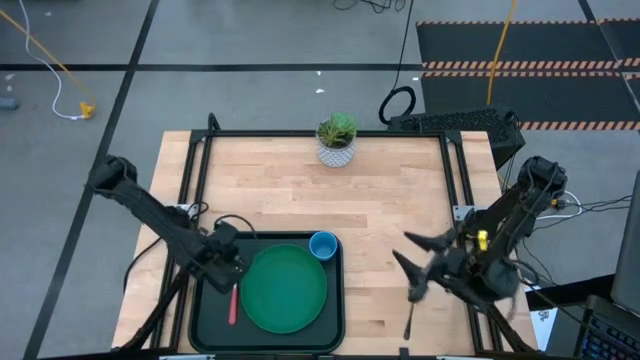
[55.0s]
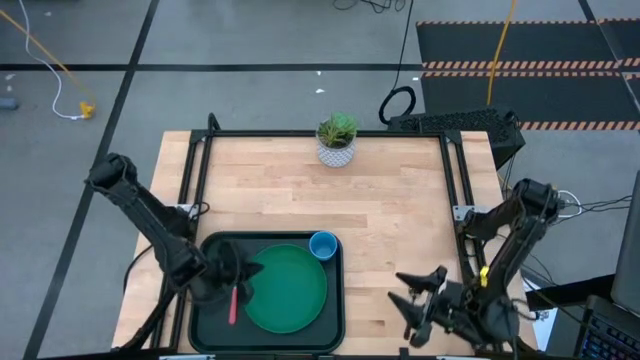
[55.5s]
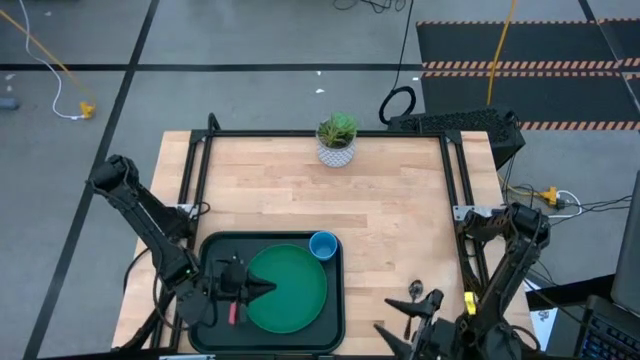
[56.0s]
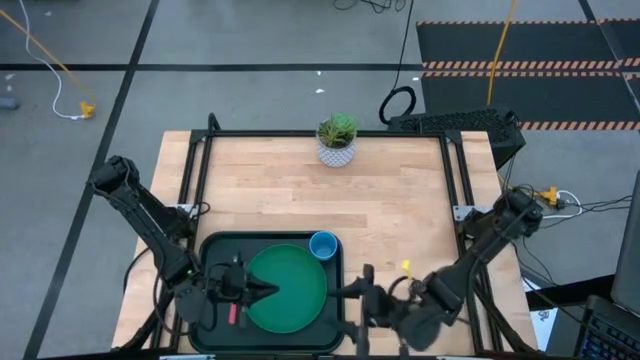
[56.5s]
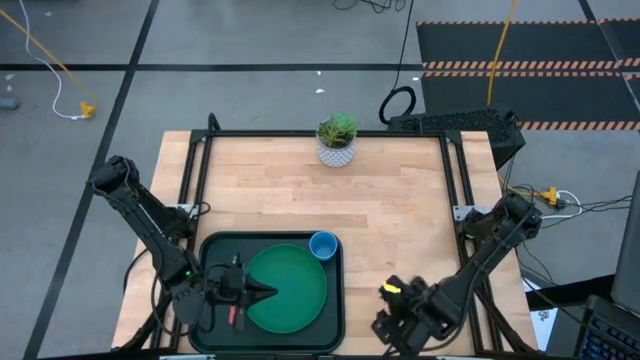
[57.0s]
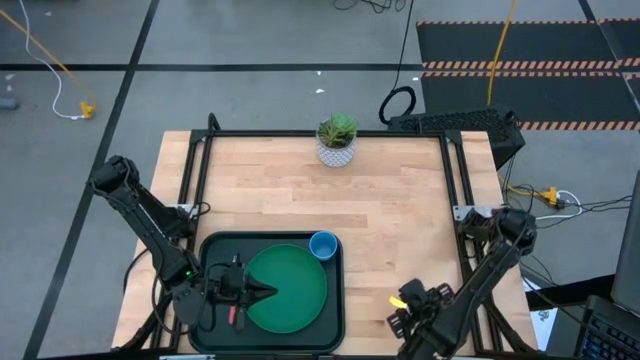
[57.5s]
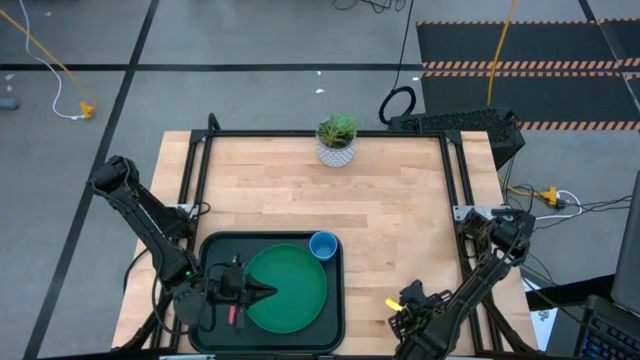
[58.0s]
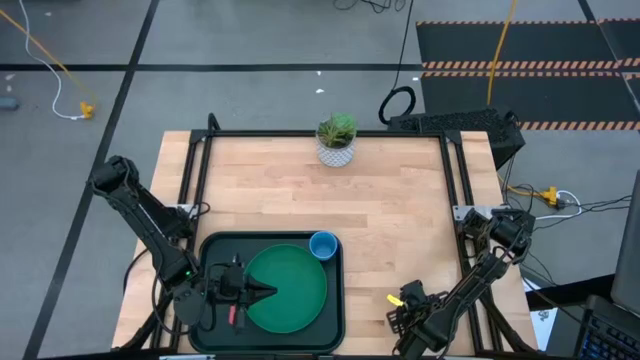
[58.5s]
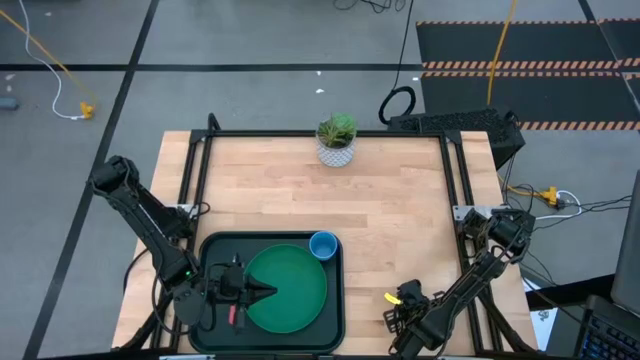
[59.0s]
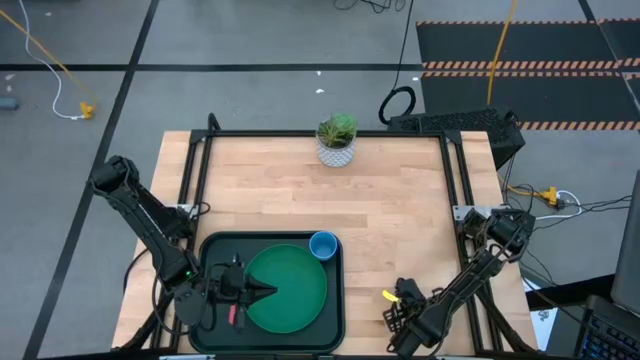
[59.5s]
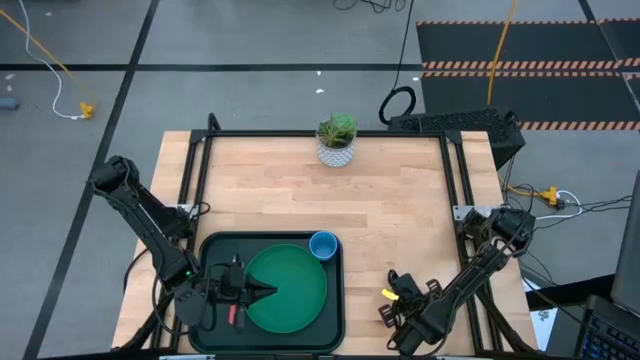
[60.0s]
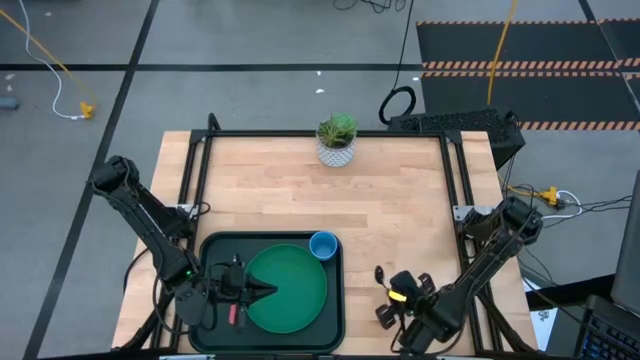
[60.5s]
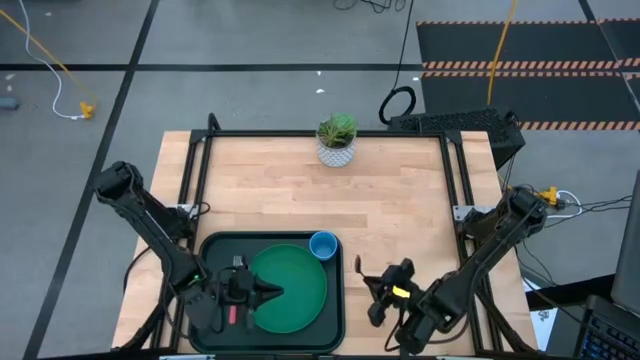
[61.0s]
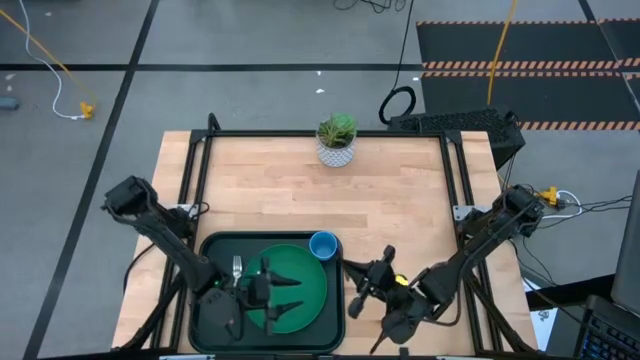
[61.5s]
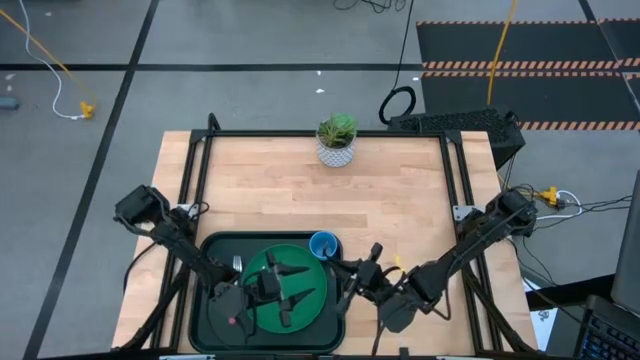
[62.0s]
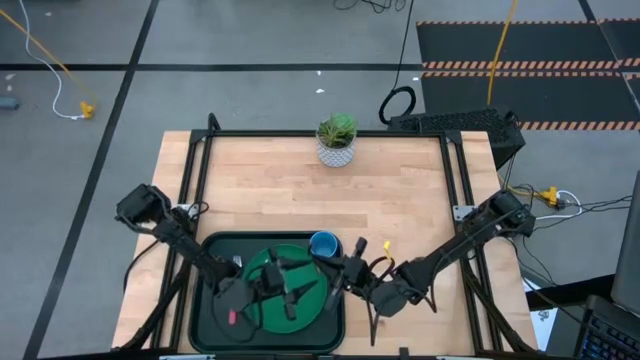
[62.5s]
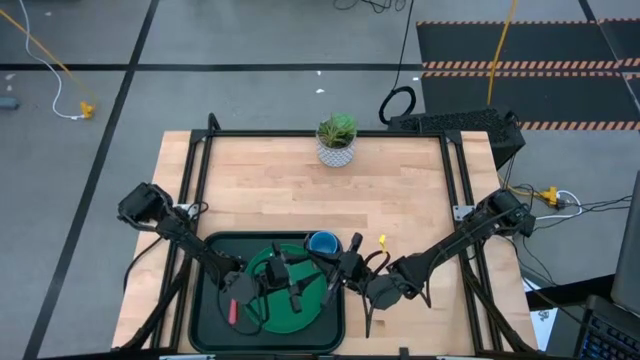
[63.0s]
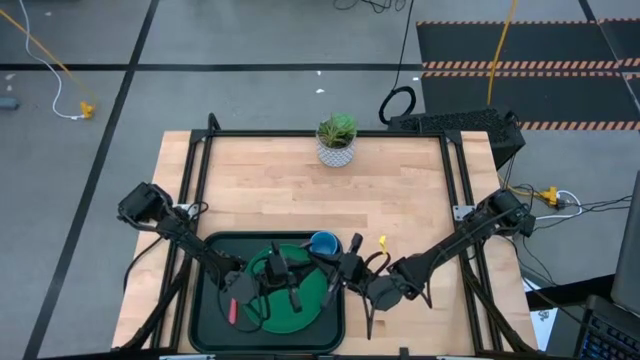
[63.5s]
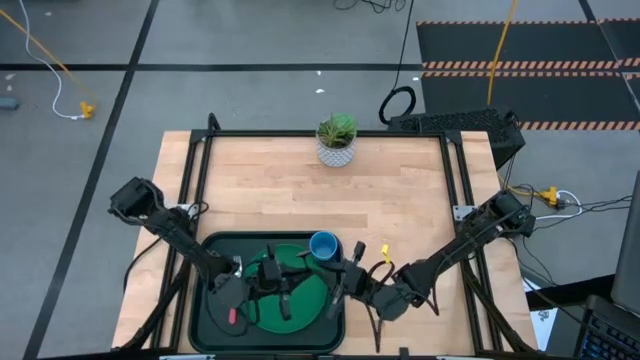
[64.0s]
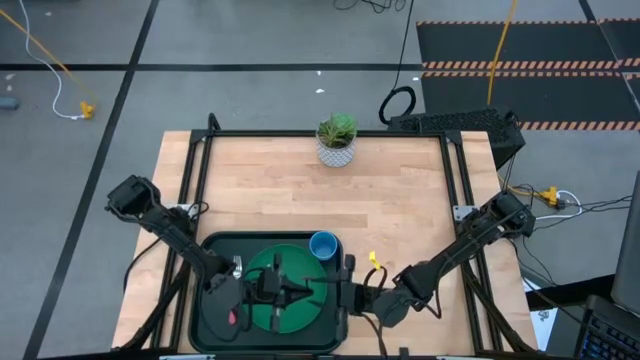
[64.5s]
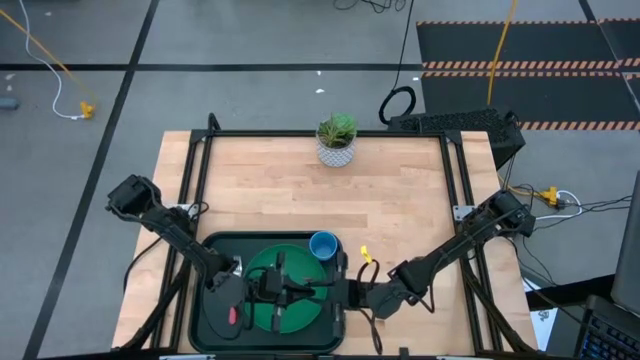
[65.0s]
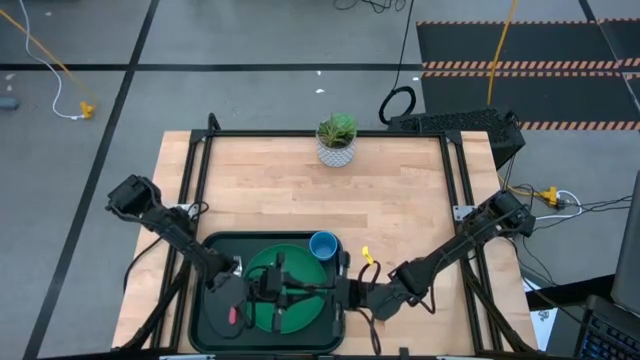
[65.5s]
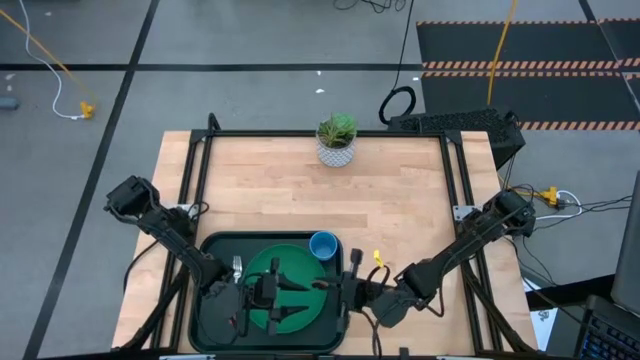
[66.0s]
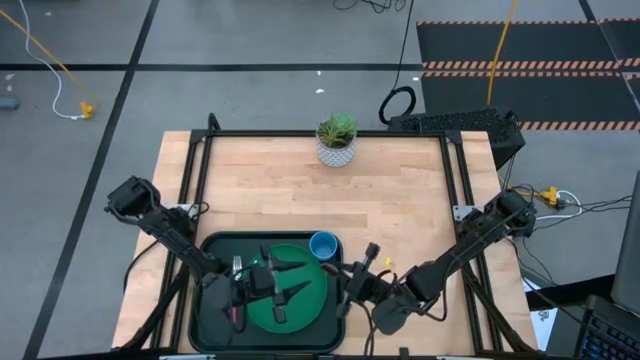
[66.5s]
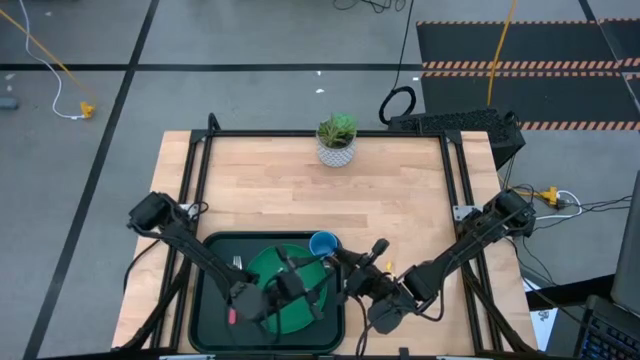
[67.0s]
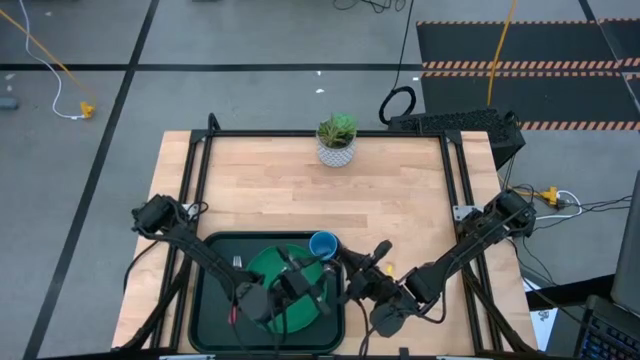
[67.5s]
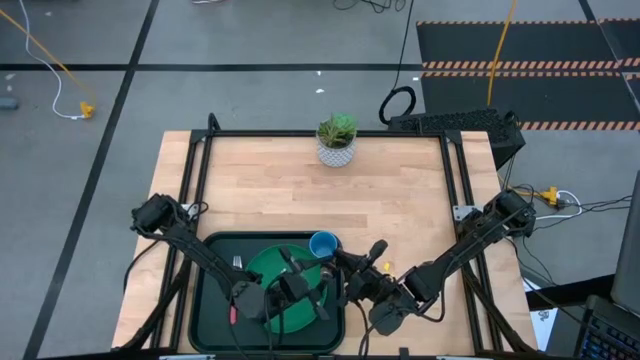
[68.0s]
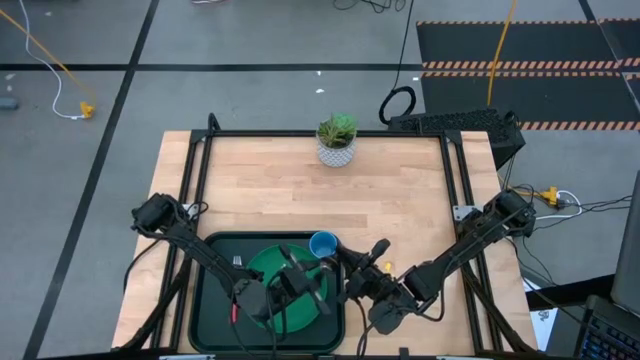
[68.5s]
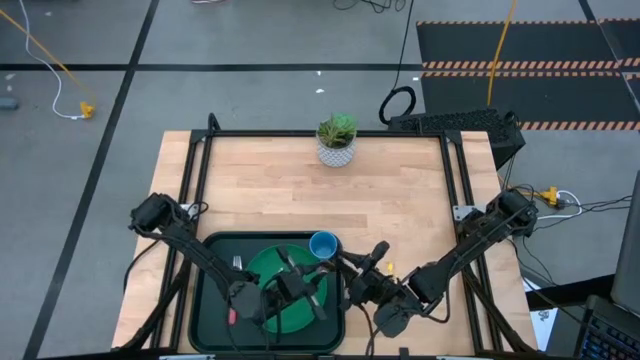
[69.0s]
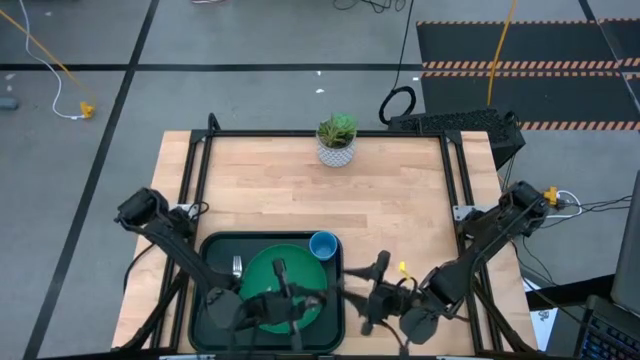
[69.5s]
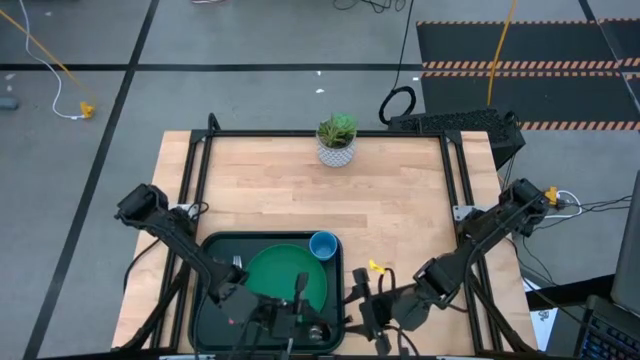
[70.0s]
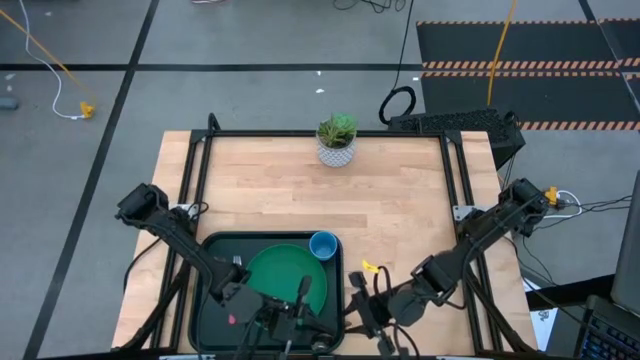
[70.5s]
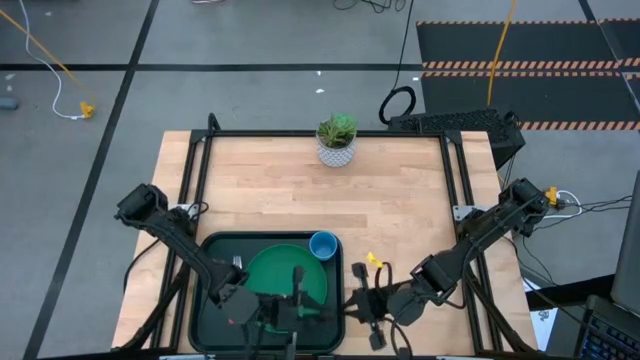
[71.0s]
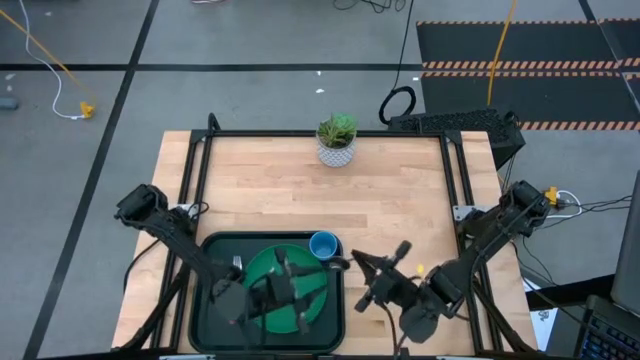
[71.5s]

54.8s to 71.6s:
Task: Pick and place plate/cup/fork/spoon on tray
Put the black spoon on the black tray to the left of the red fork

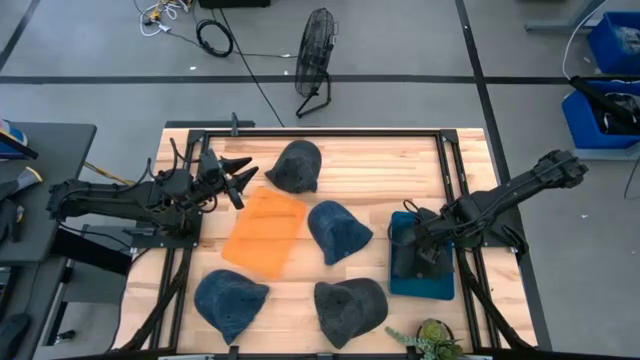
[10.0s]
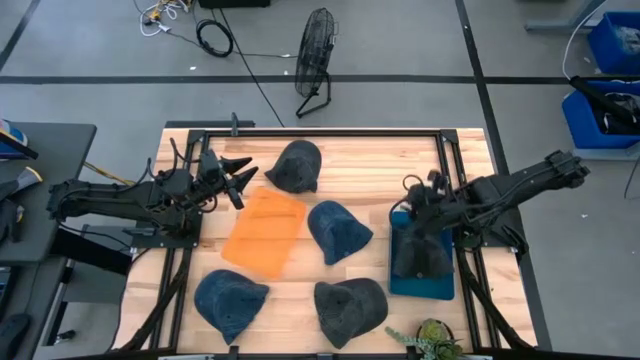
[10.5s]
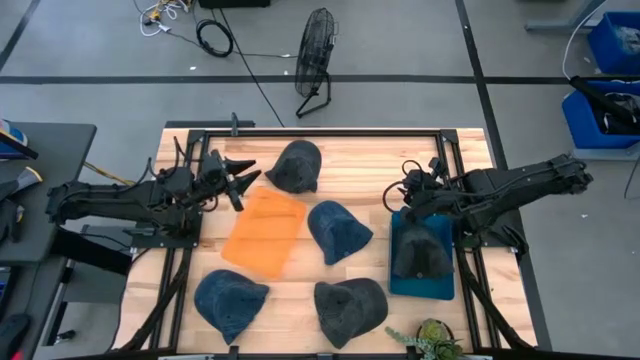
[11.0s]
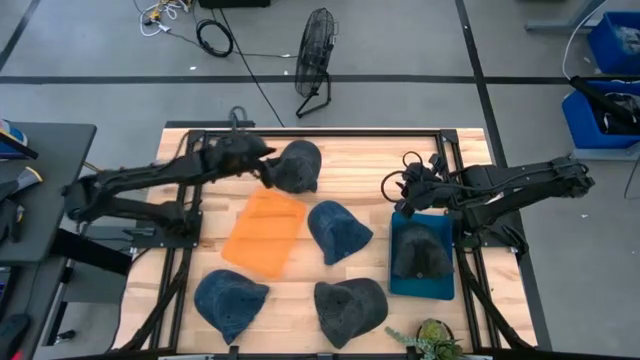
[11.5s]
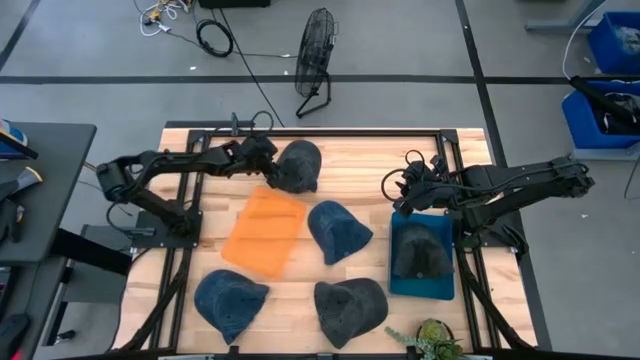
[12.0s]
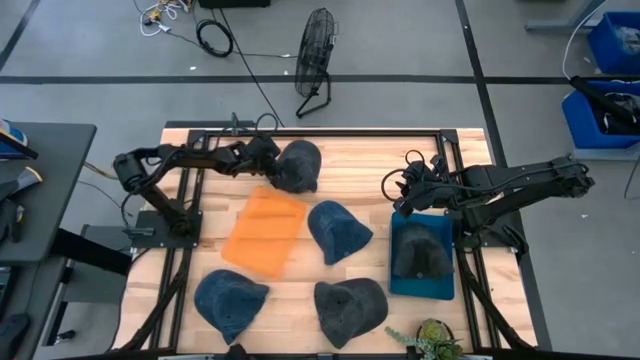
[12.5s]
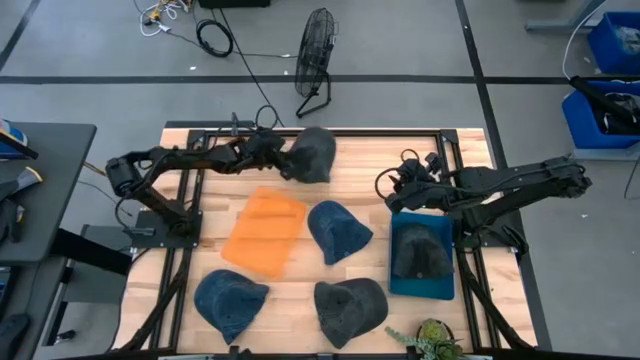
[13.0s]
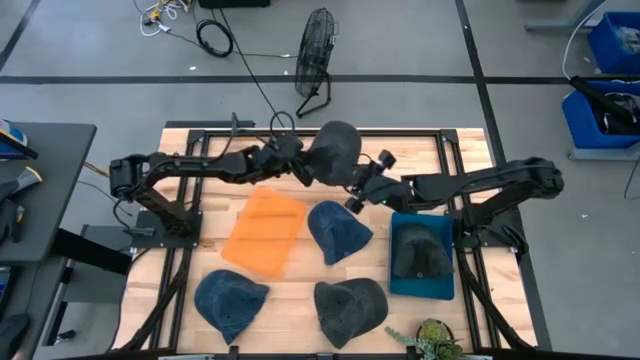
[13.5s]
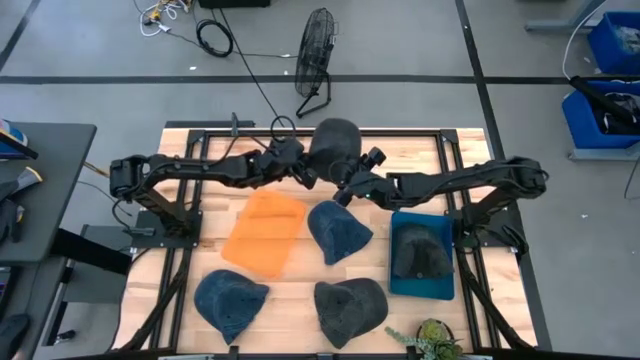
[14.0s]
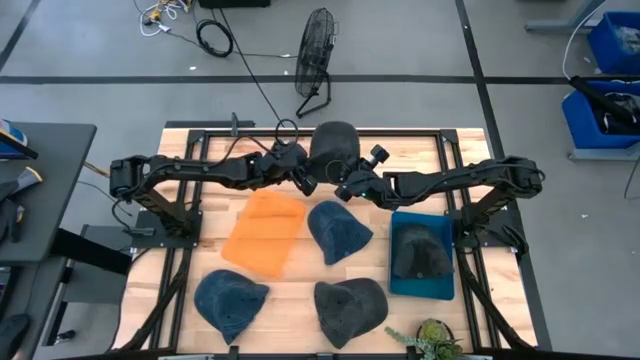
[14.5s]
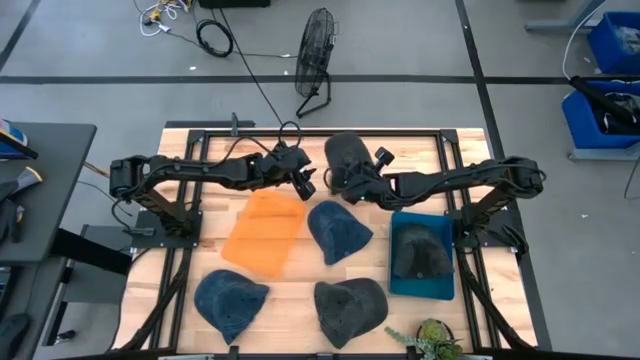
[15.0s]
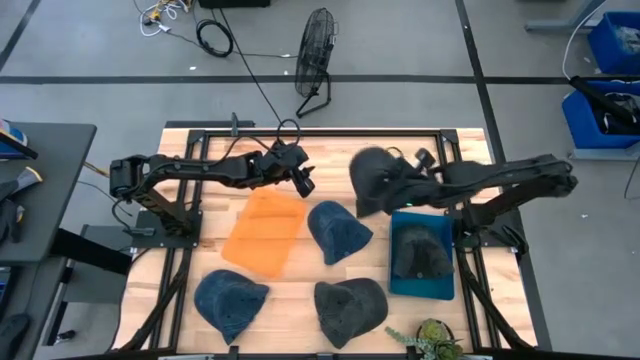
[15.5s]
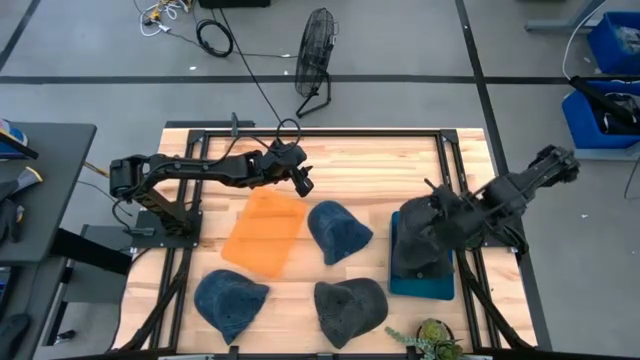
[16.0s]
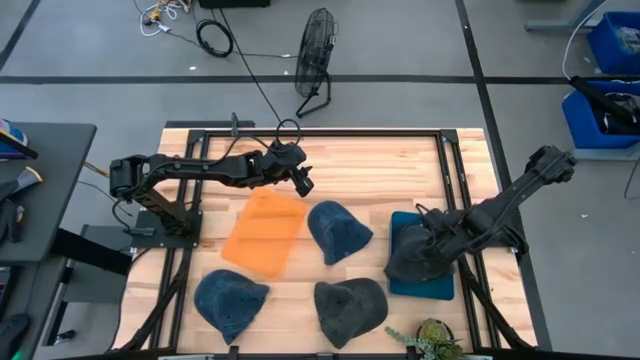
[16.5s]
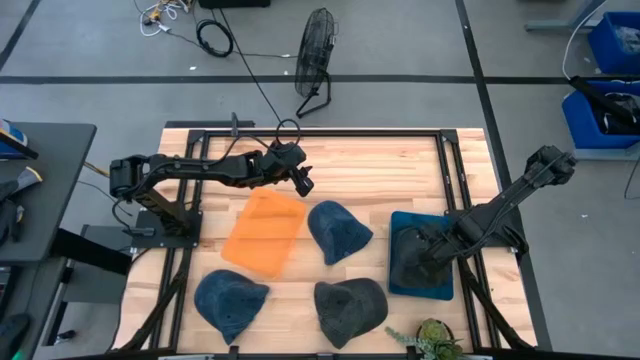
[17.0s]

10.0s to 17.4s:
Task: Pick & Place hat
Put the top black cap into the blue bin
